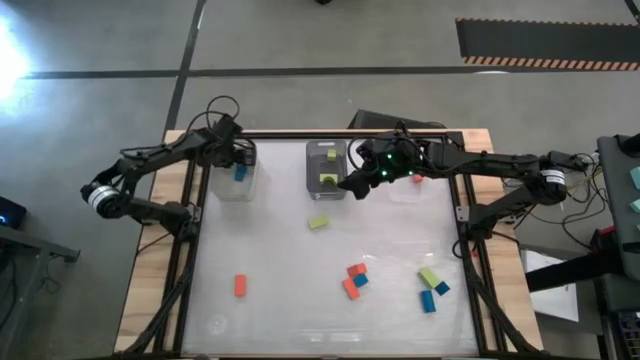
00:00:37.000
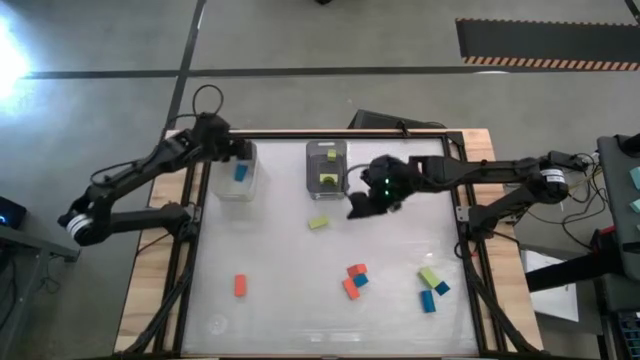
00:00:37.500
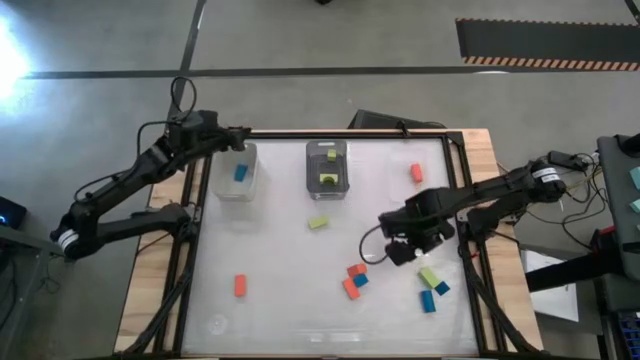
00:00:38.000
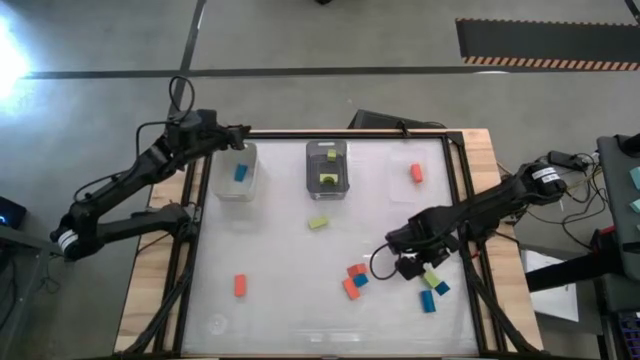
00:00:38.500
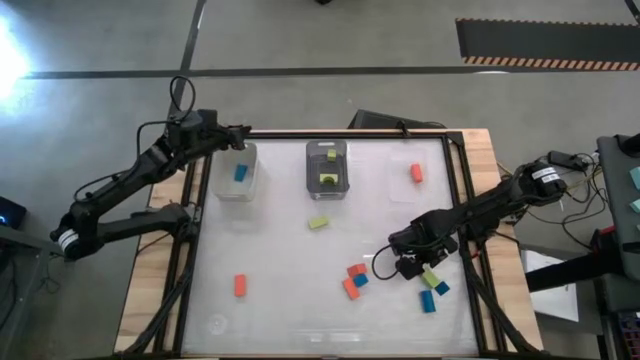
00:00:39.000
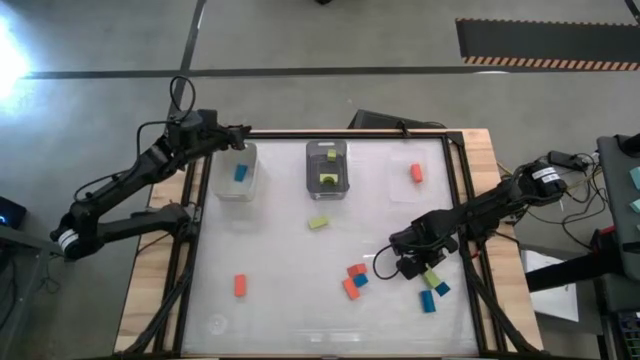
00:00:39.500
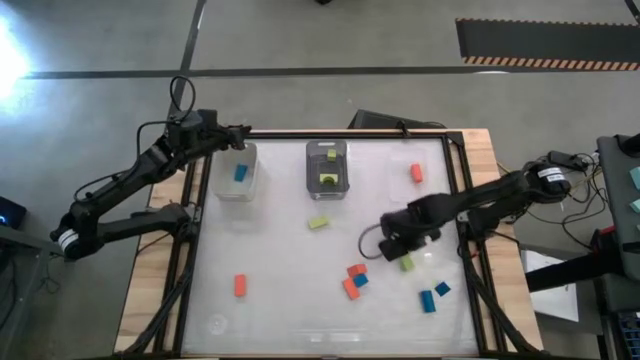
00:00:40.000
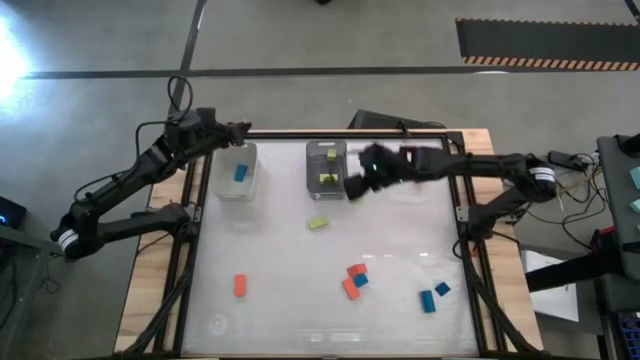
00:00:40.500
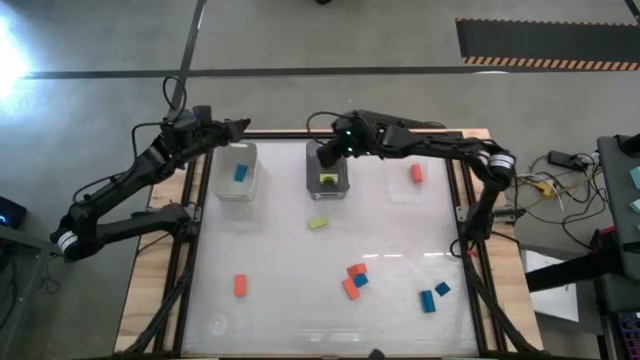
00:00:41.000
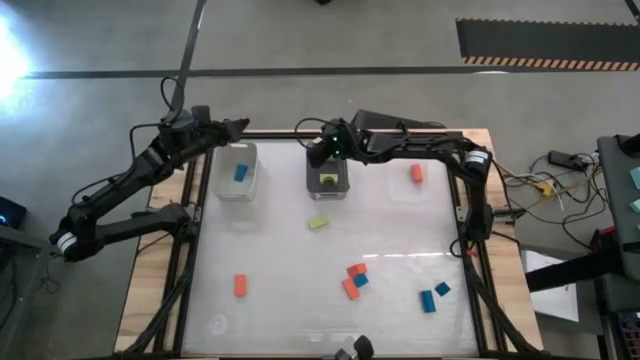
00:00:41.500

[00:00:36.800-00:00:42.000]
Task: Sort & place blocks by color
Put the green block into the black transparent bin

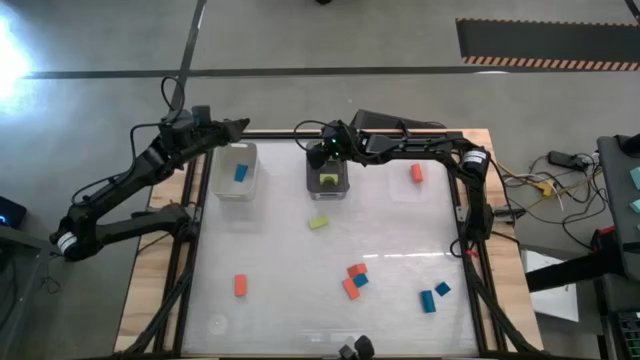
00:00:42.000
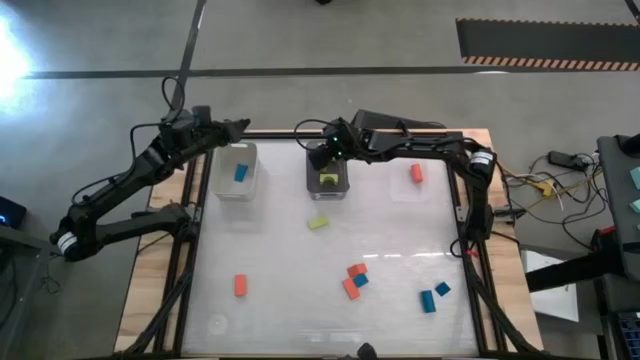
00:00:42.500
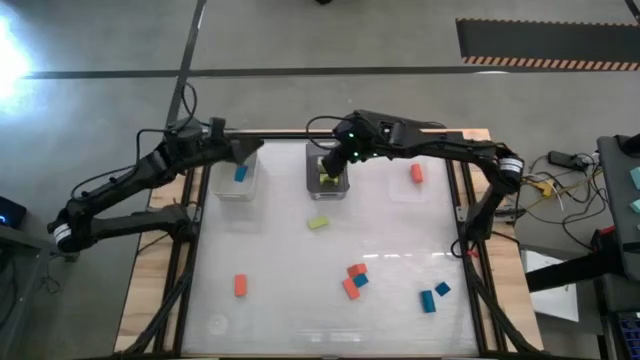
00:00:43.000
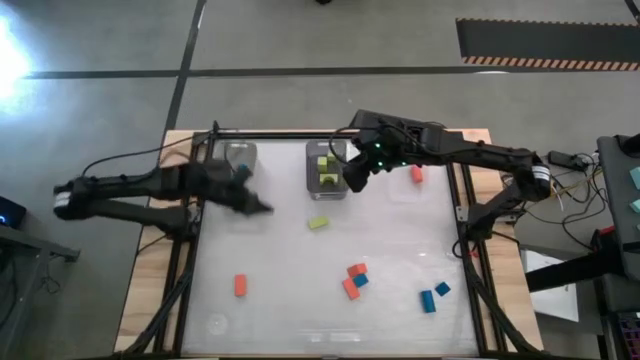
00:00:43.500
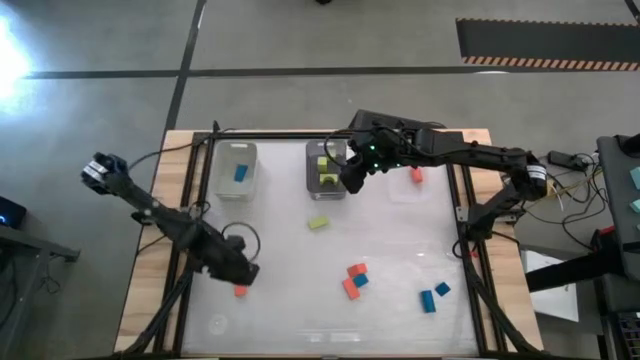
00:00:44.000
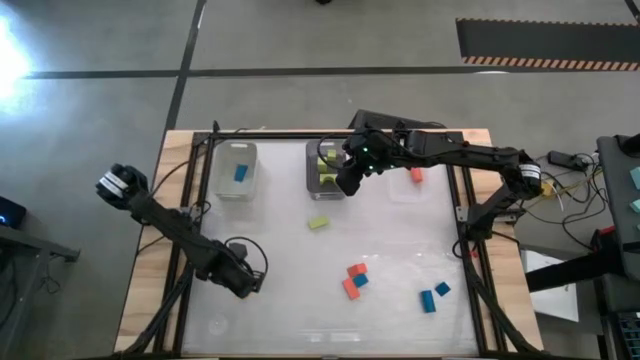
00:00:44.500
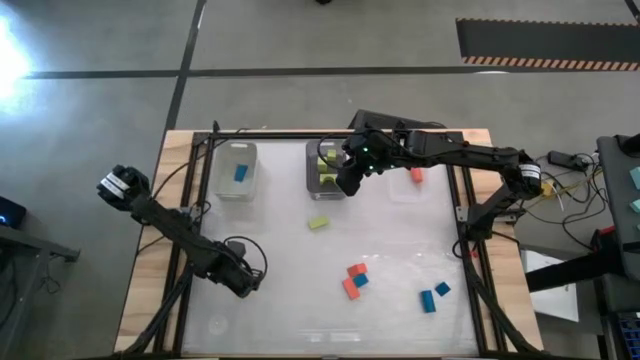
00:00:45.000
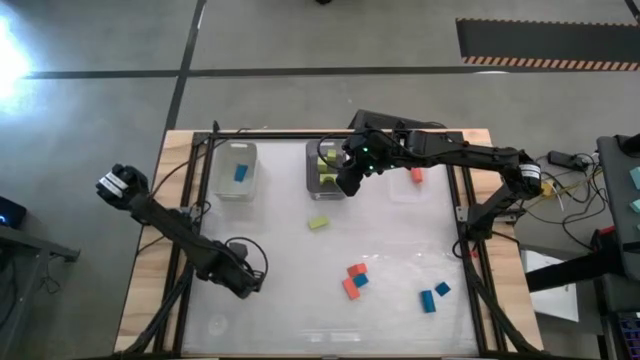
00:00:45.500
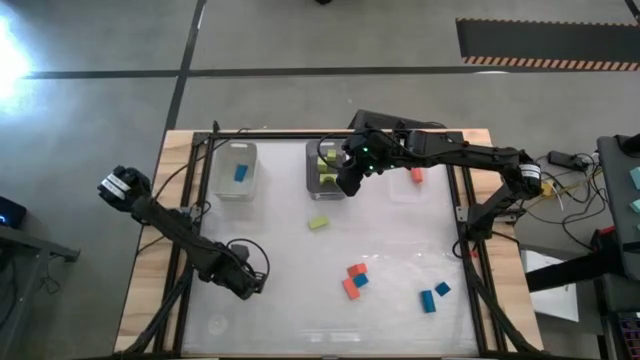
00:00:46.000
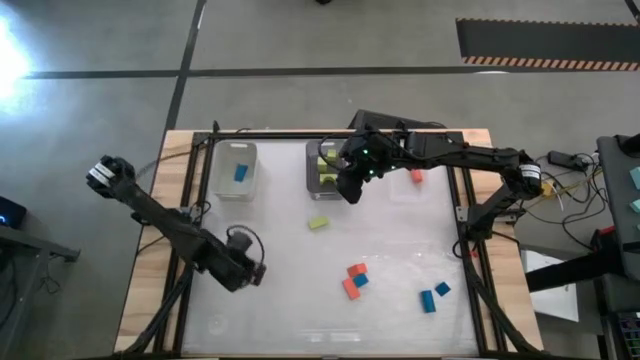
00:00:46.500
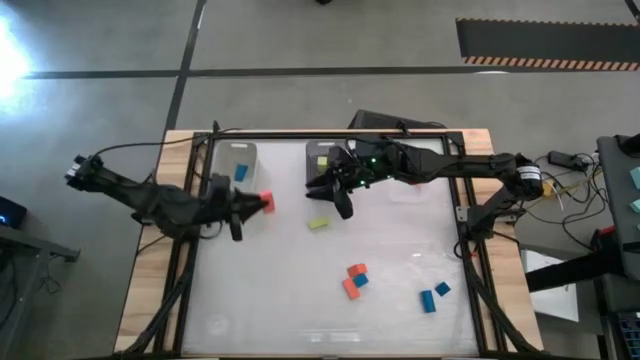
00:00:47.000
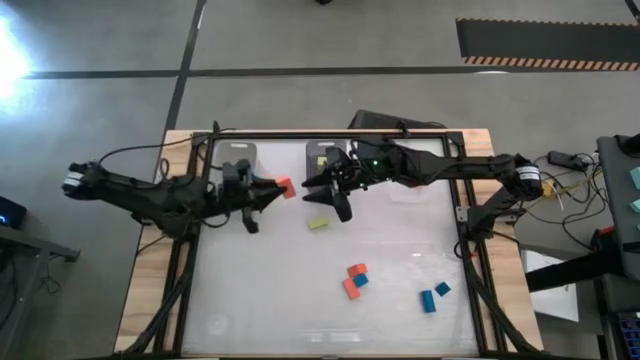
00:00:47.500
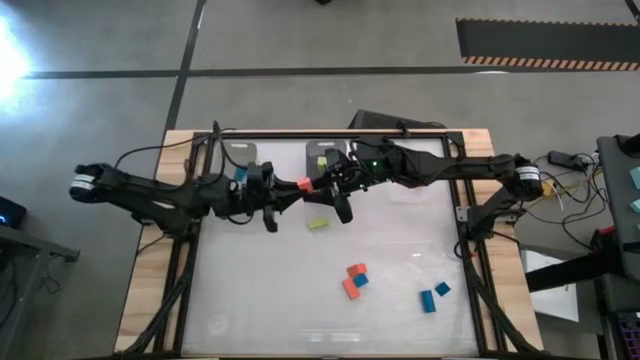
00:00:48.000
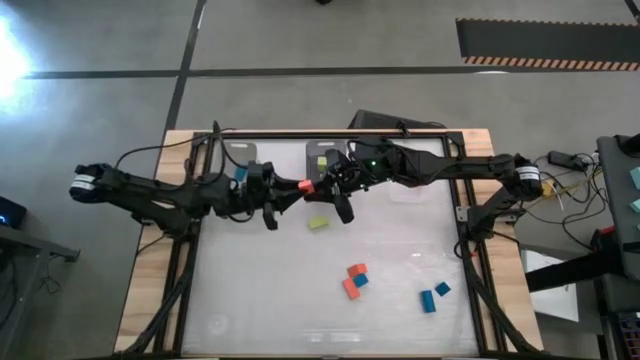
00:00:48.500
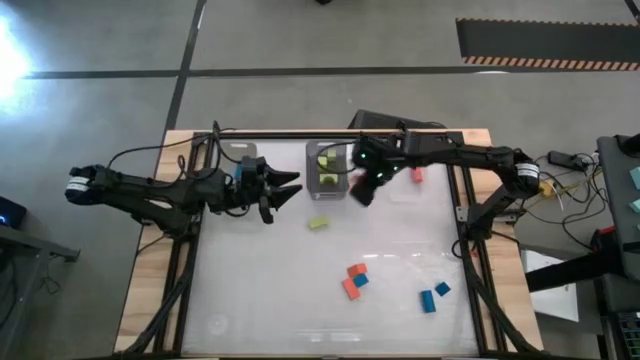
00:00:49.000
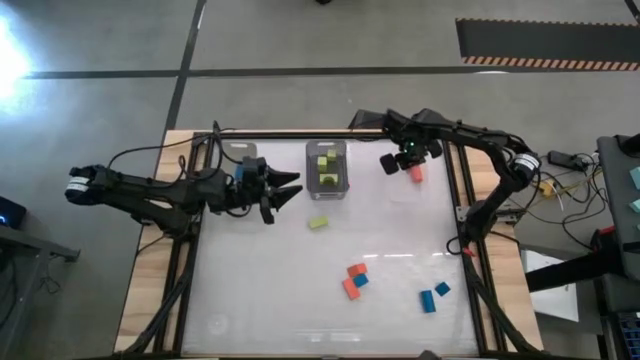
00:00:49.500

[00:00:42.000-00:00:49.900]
Put the orange block into the transparent bin

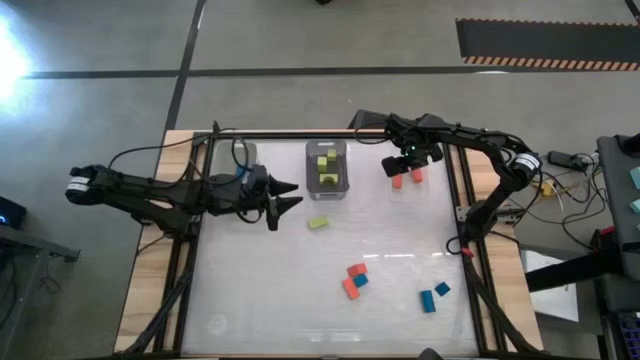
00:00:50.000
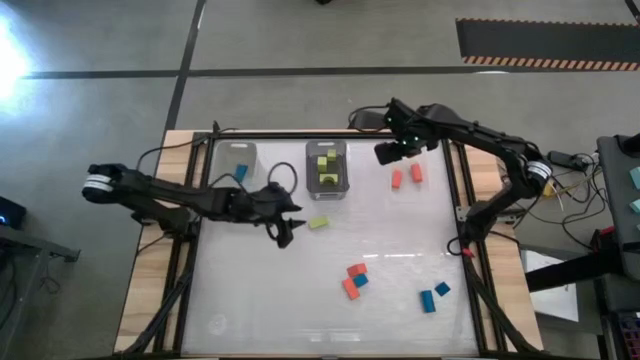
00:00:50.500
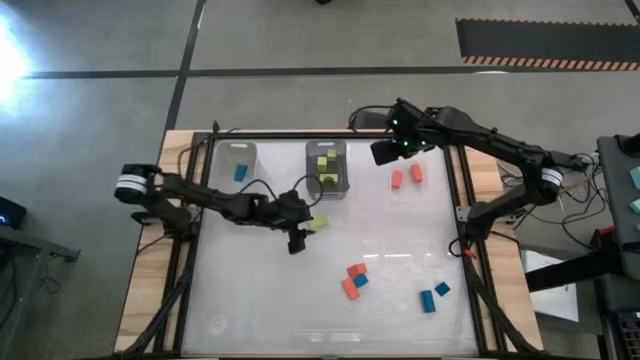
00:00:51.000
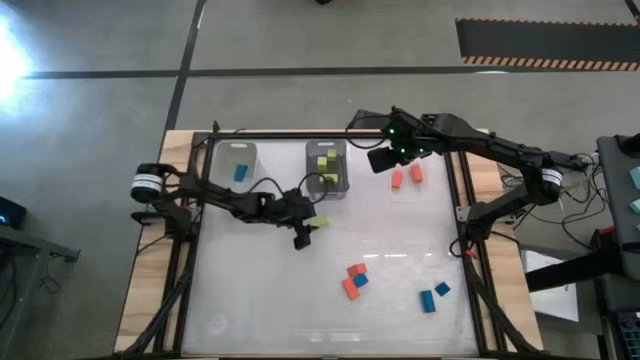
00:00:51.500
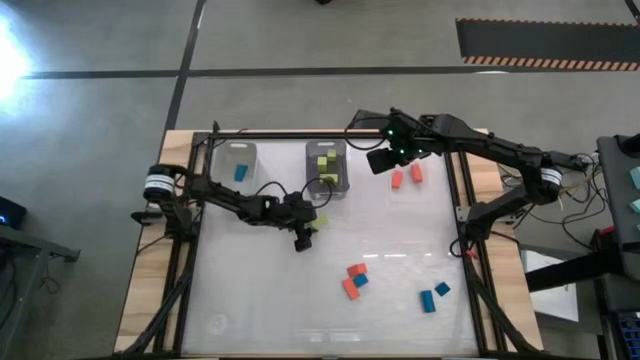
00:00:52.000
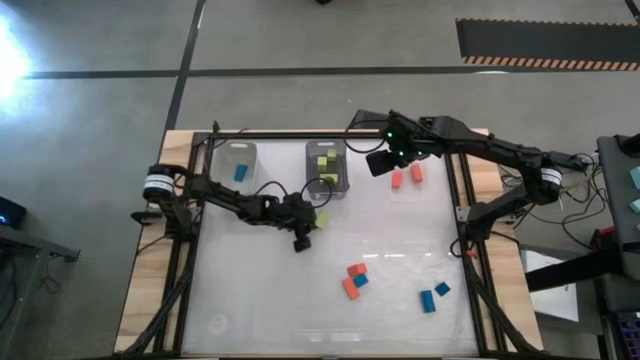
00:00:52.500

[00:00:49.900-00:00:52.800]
Put the green block into the black transparent bin

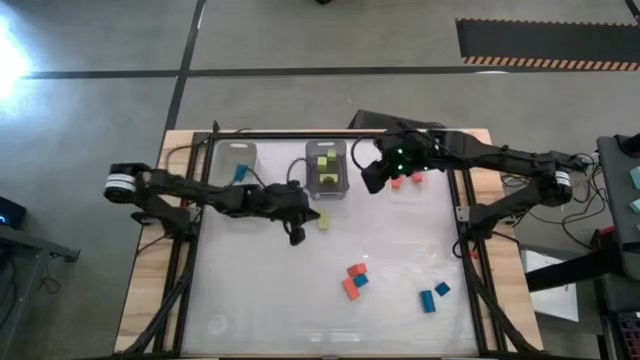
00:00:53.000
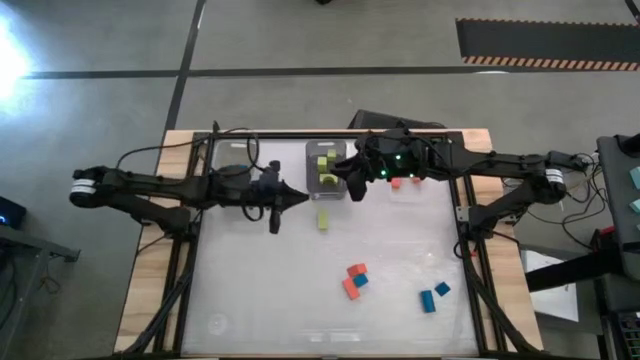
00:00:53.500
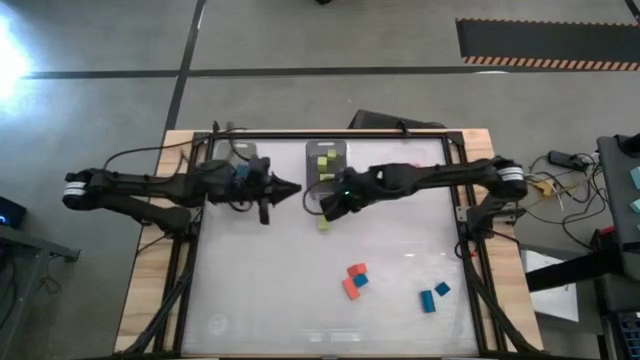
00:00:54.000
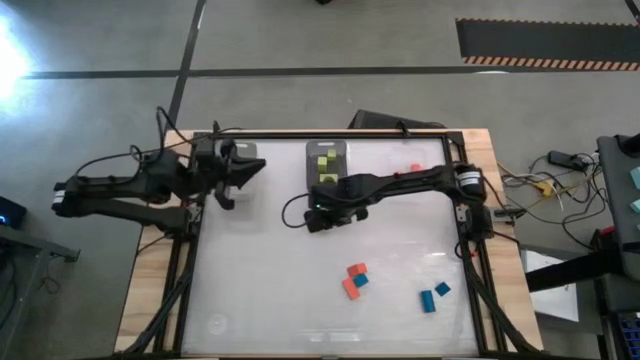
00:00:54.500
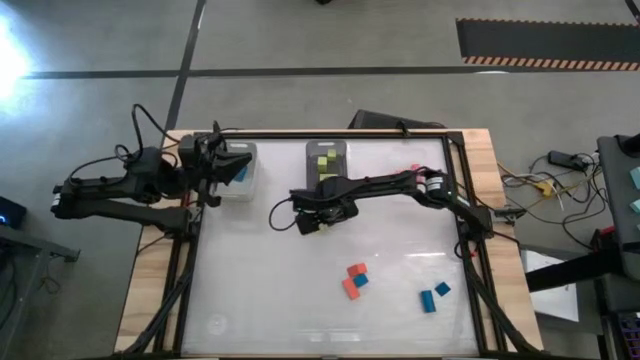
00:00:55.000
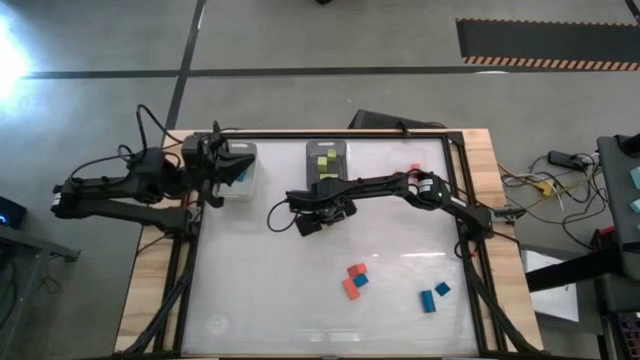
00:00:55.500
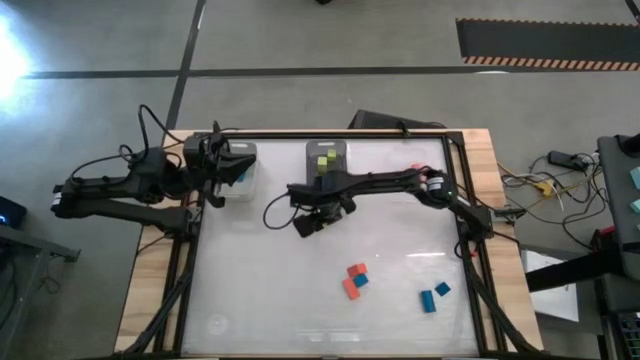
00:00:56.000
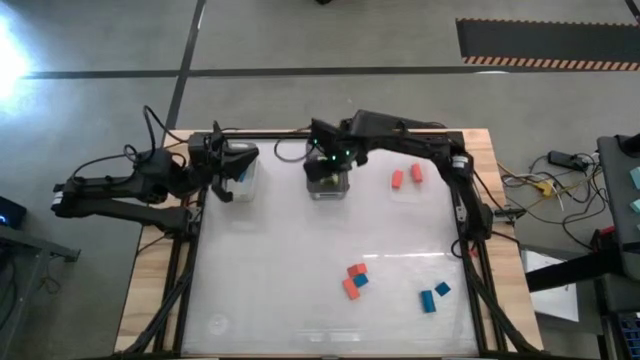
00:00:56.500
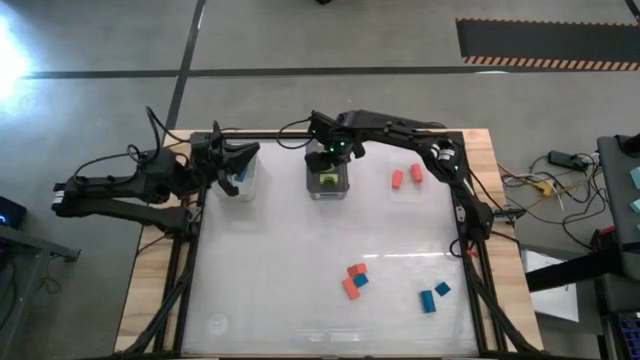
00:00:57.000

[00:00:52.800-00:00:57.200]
Put the green block into the black transparent bin
